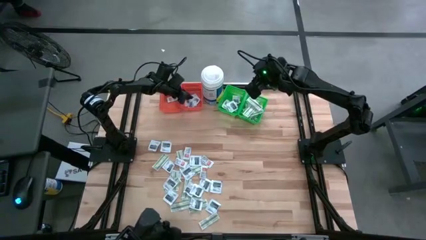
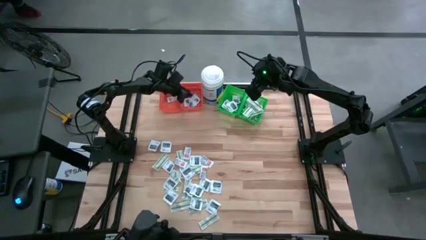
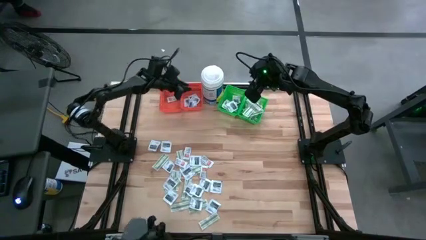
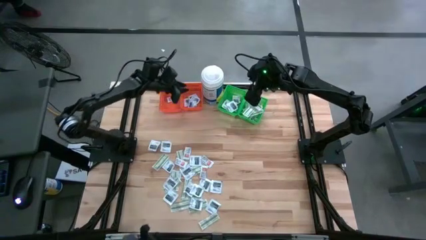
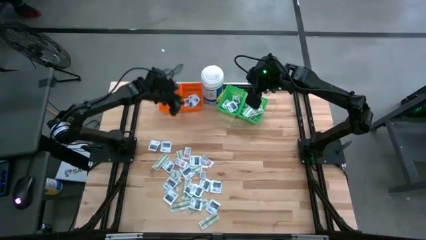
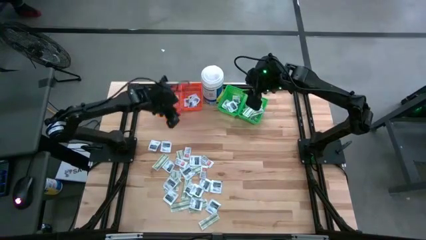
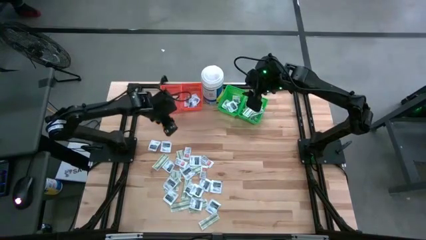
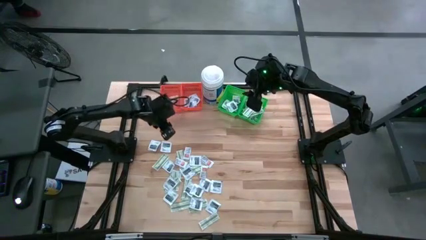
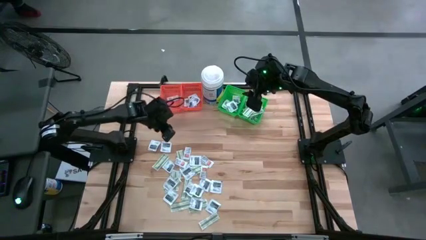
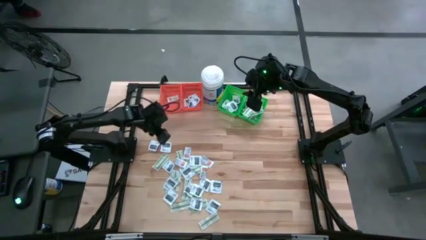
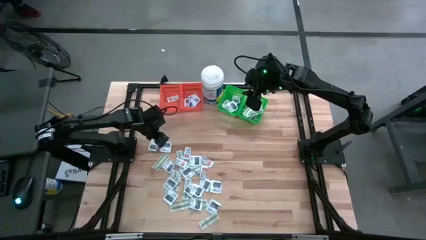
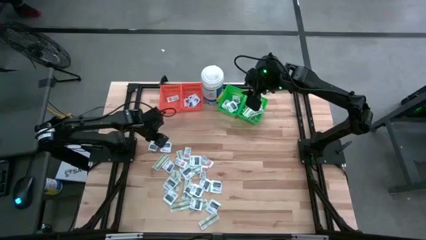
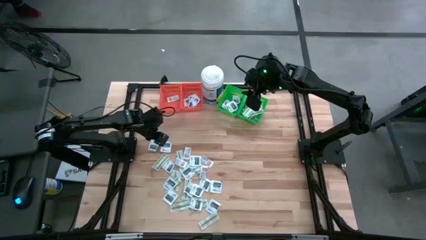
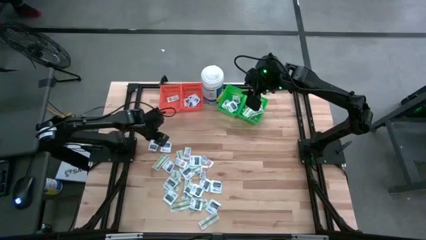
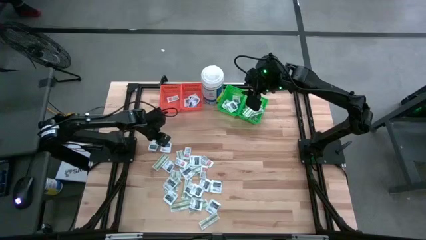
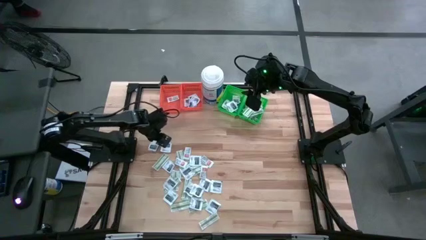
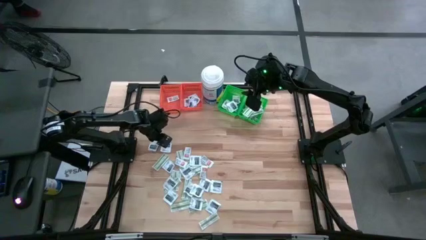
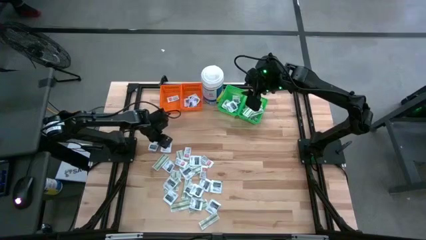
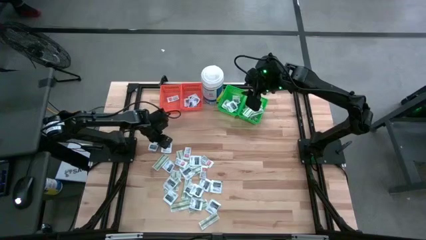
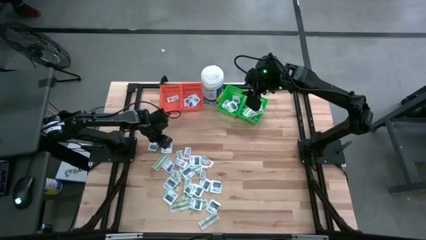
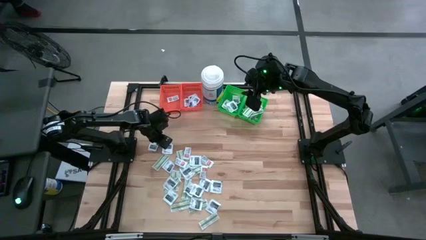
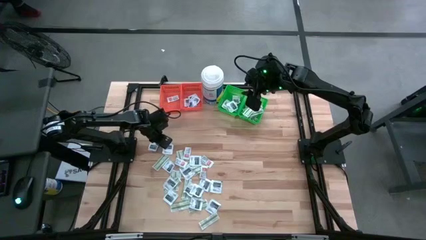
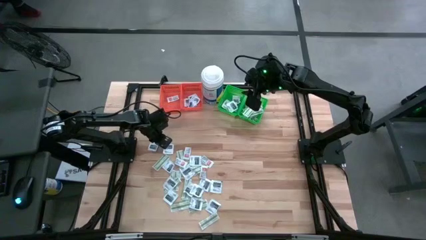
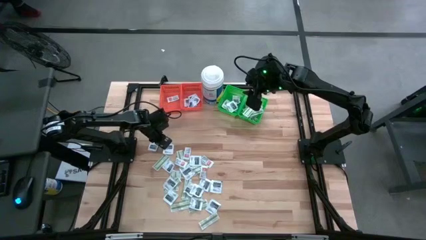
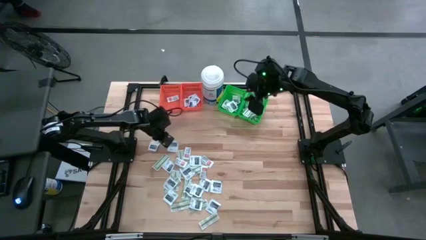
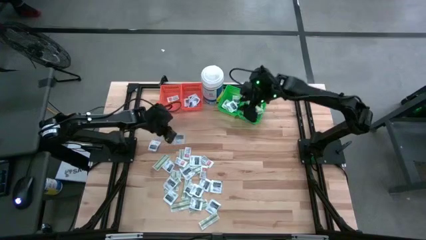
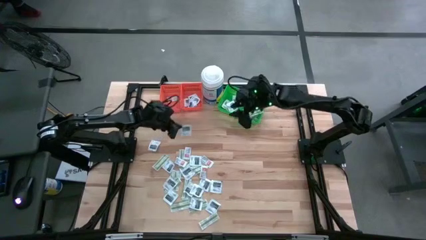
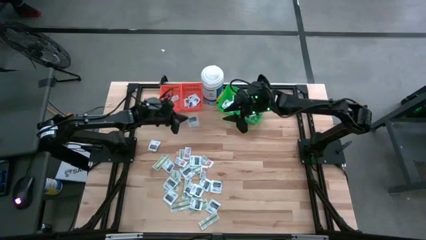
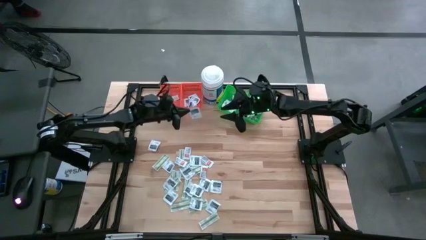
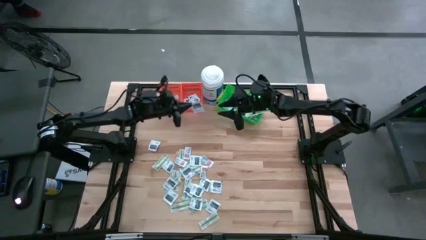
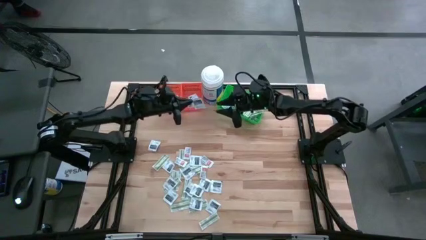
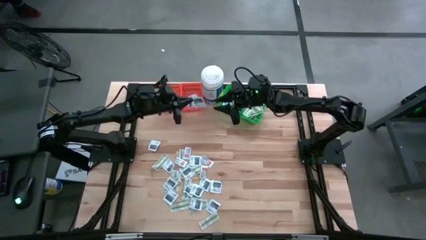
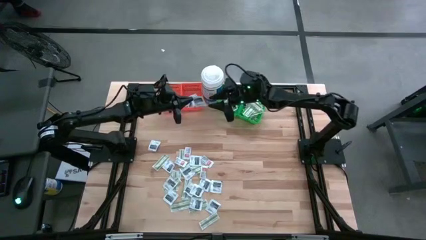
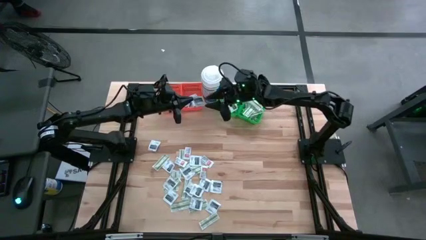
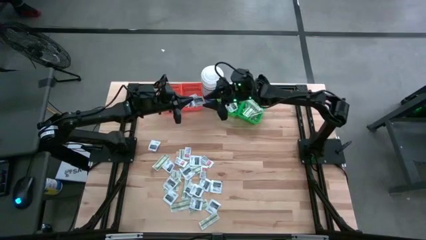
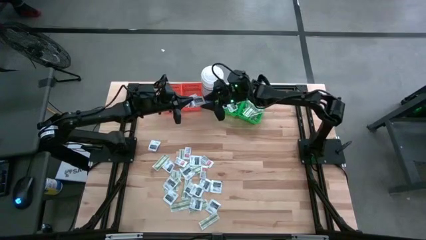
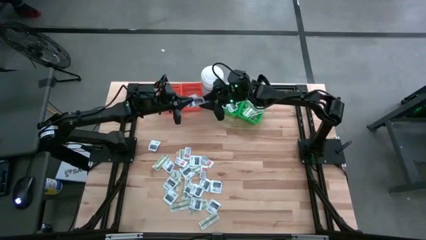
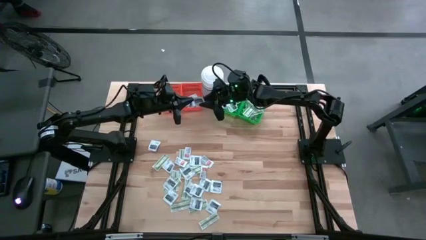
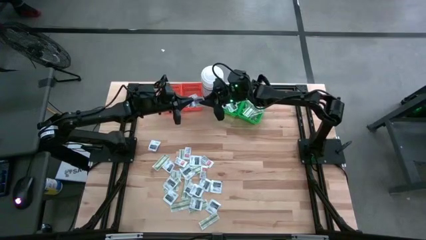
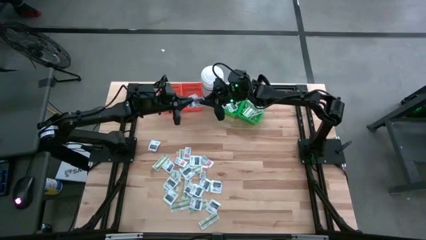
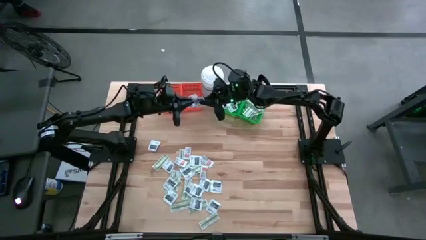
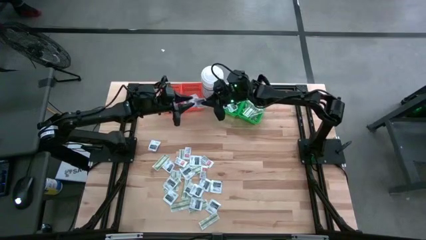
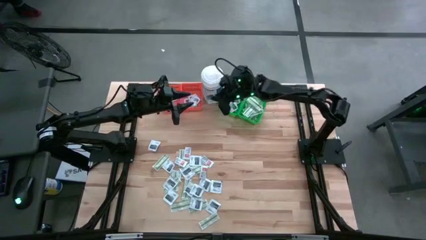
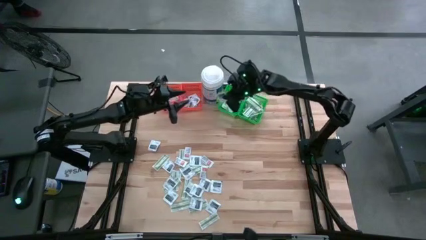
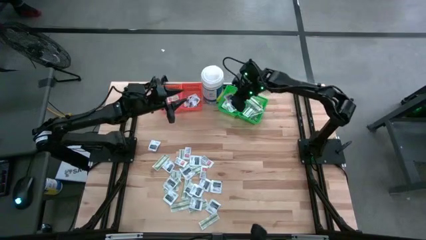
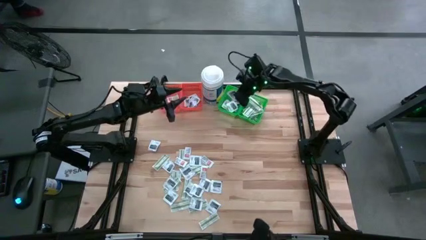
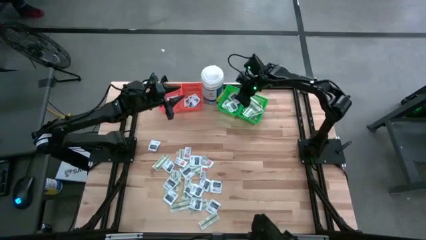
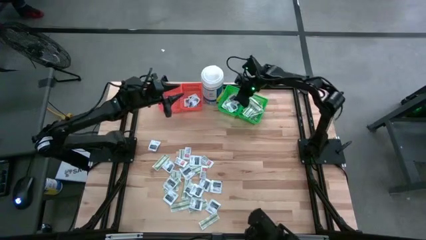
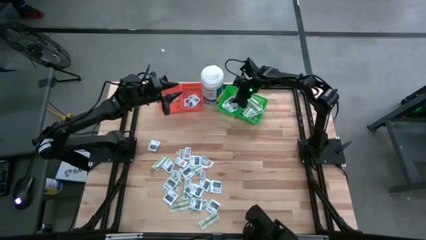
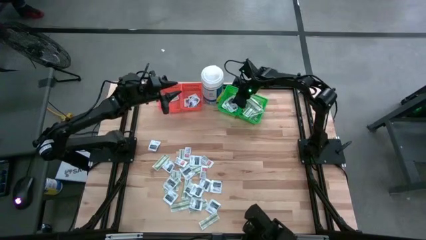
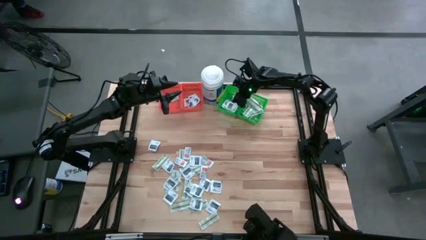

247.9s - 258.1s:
Task: Pick & Place First Aid Supplies
Put the black towelette pack into the left green bin

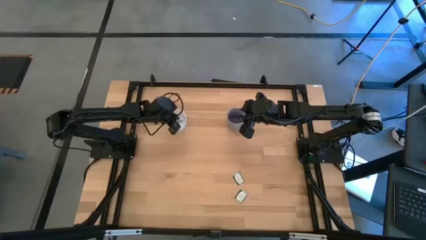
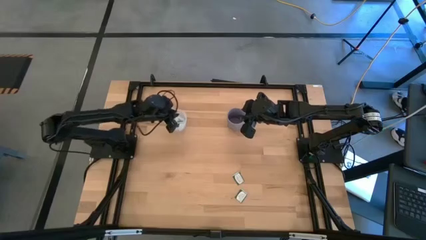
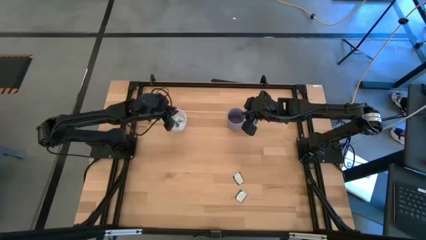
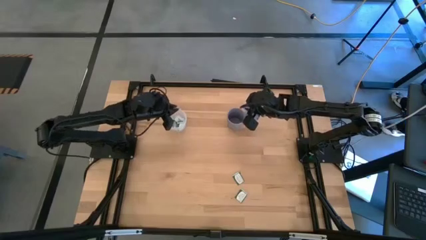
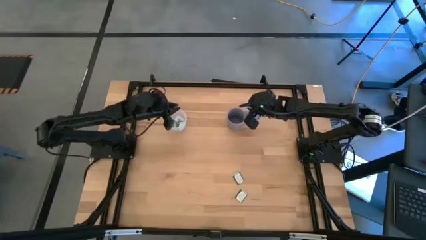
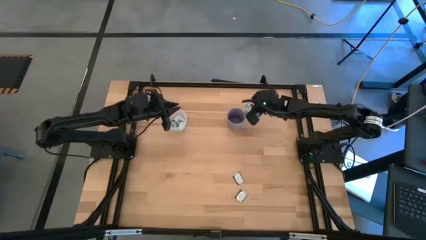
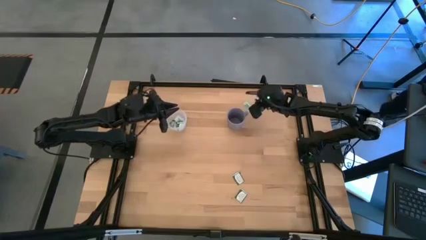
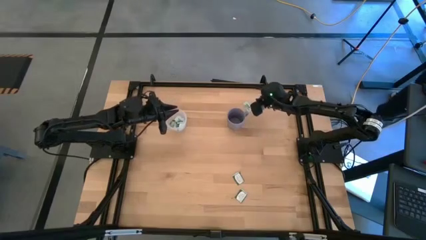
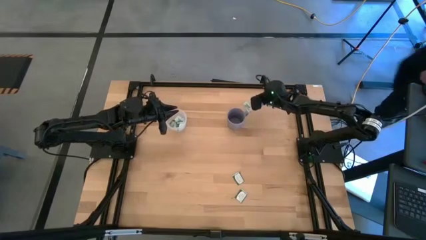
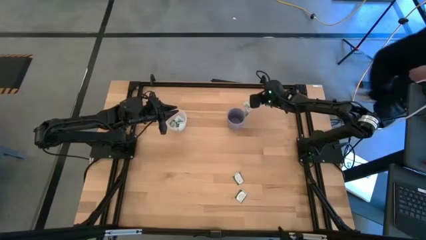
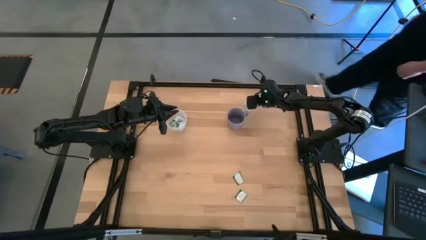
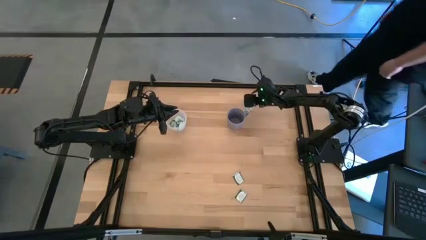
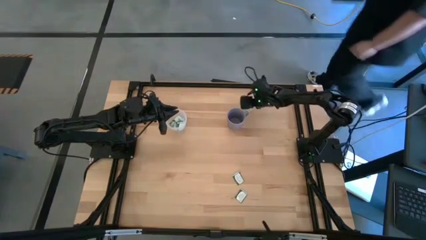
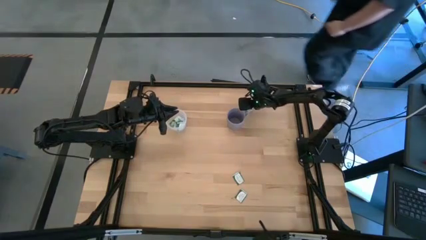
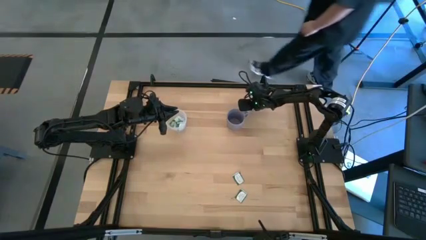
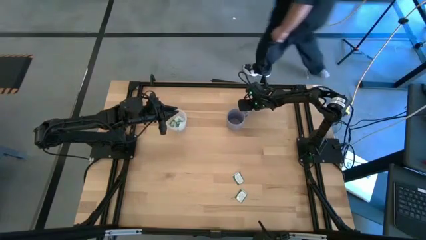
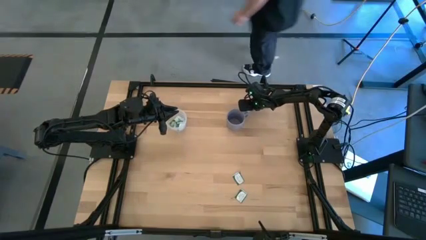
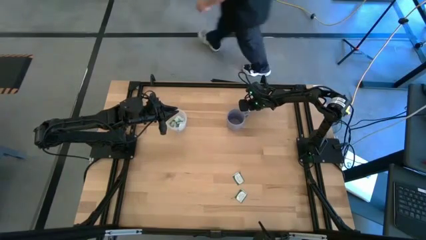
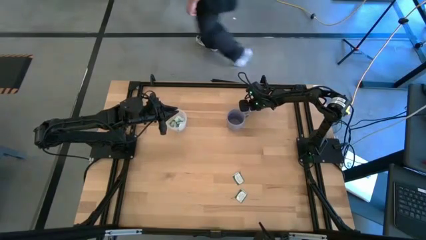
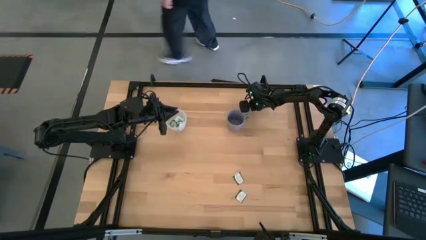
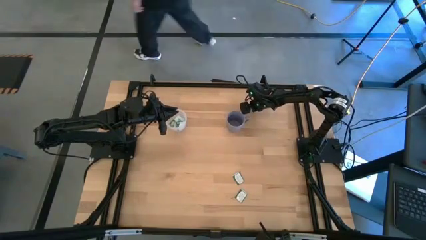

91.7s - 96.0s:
Task: Pick and place Stevia / Truvia into bins
Put the light green stevia packet into the transparent container
